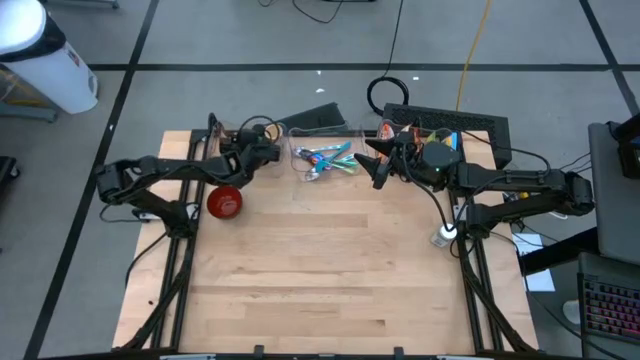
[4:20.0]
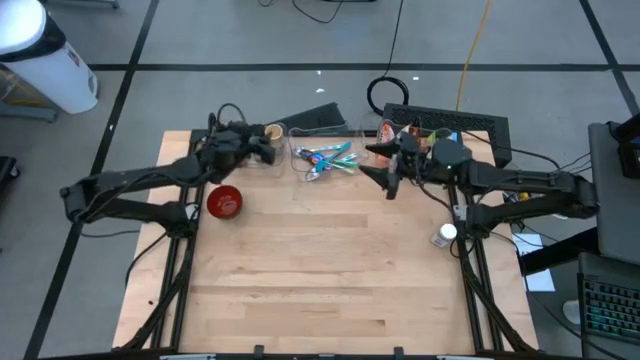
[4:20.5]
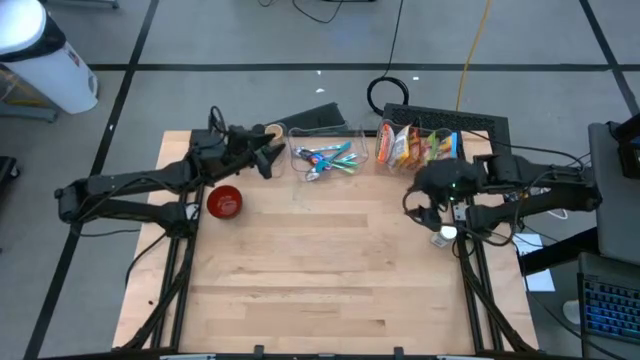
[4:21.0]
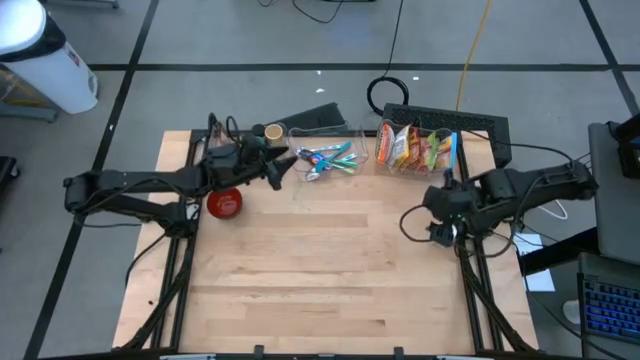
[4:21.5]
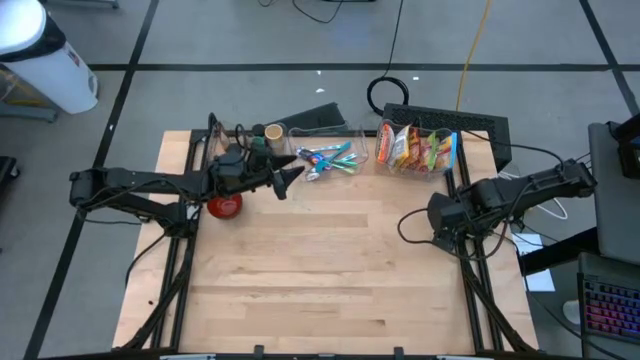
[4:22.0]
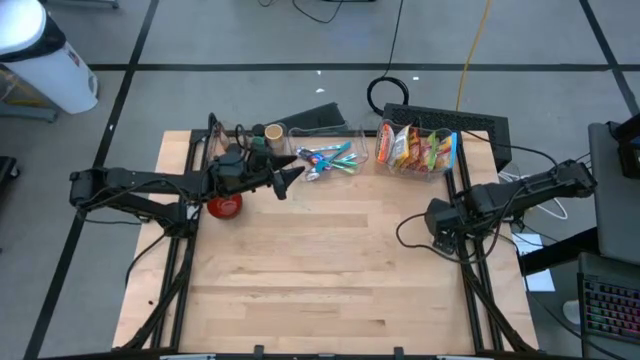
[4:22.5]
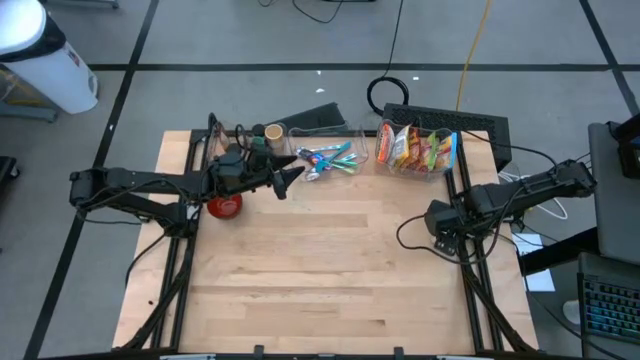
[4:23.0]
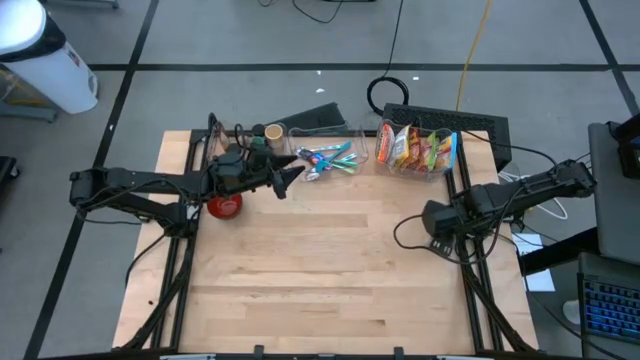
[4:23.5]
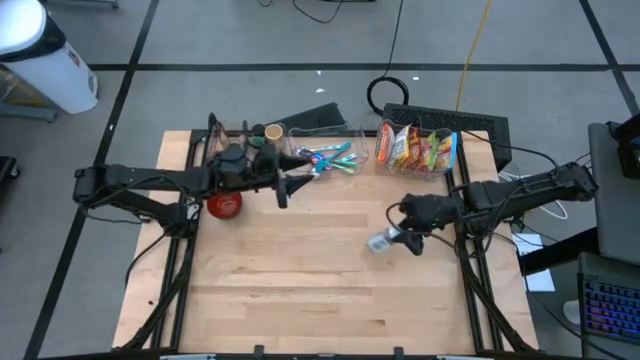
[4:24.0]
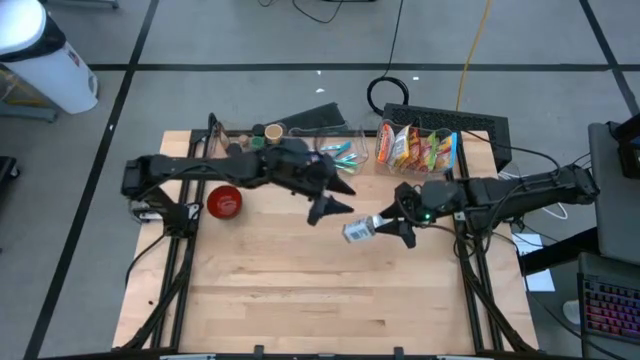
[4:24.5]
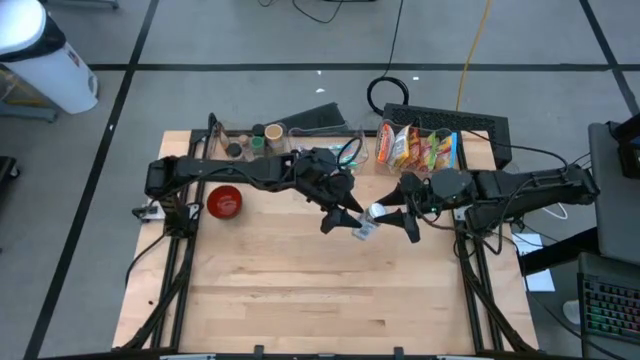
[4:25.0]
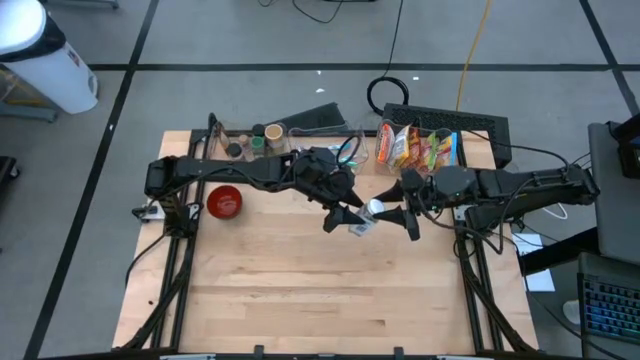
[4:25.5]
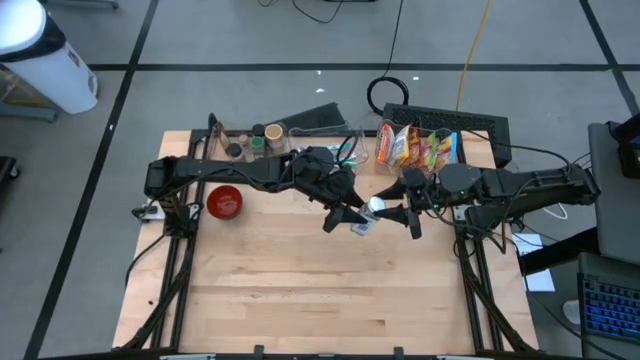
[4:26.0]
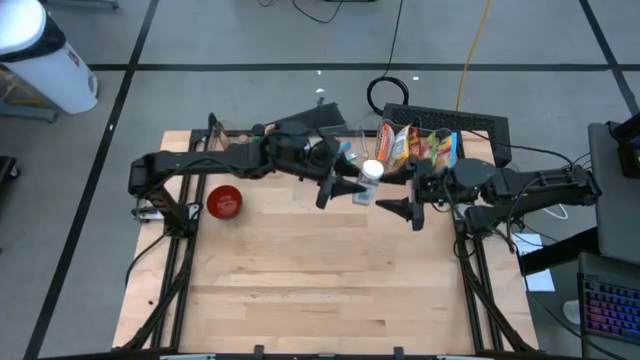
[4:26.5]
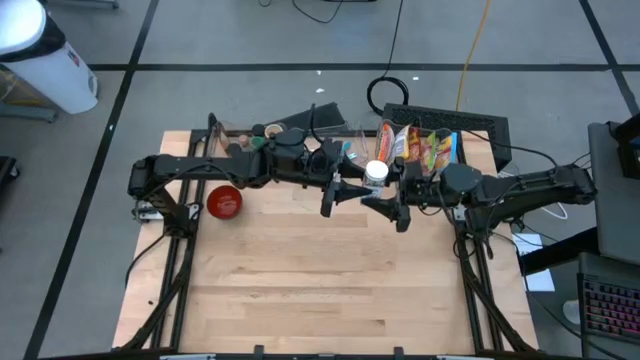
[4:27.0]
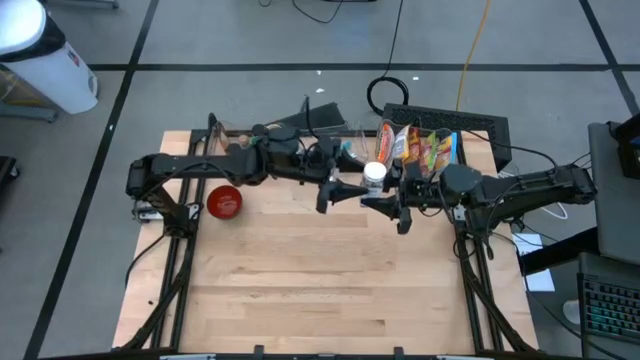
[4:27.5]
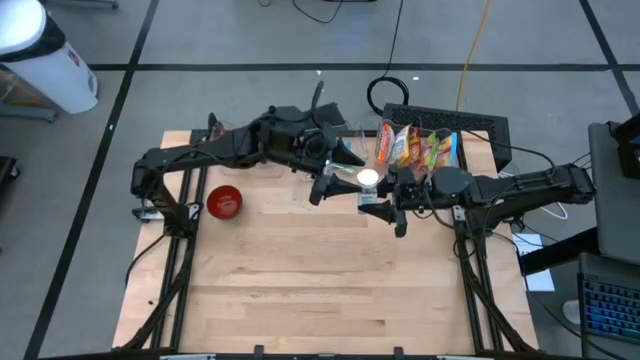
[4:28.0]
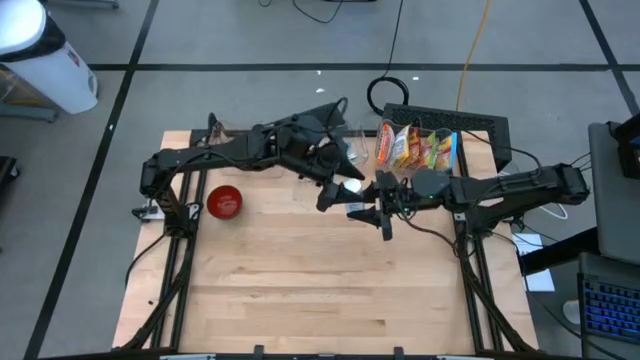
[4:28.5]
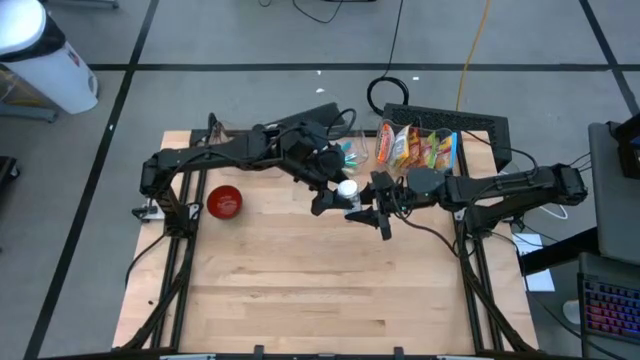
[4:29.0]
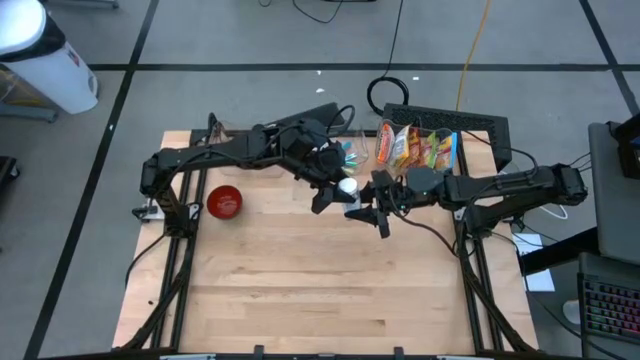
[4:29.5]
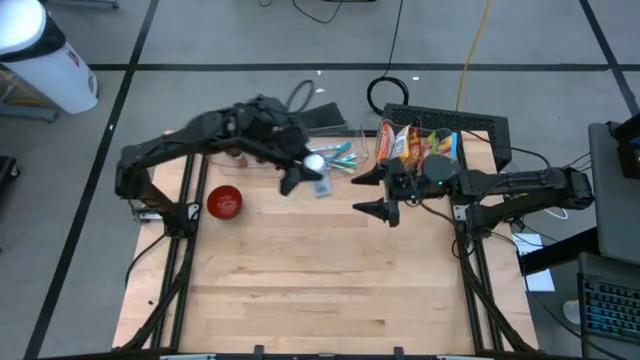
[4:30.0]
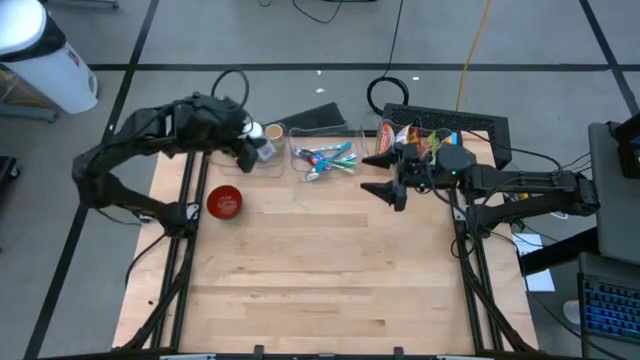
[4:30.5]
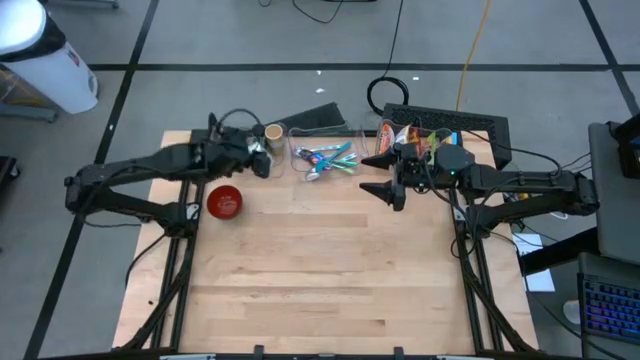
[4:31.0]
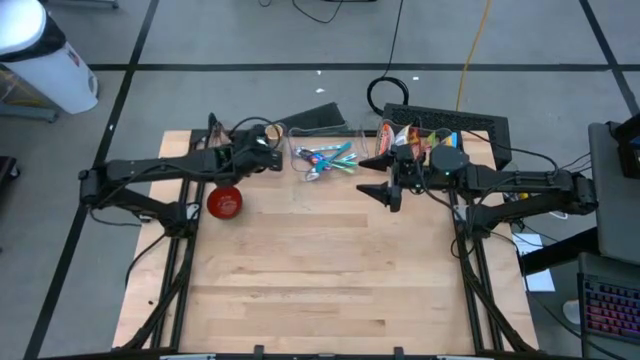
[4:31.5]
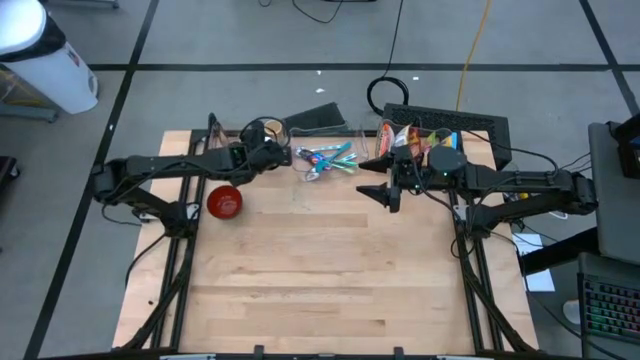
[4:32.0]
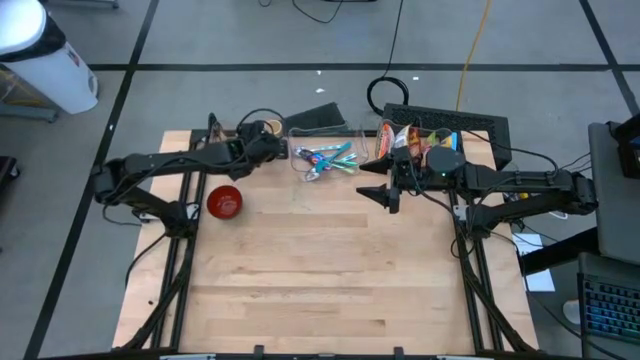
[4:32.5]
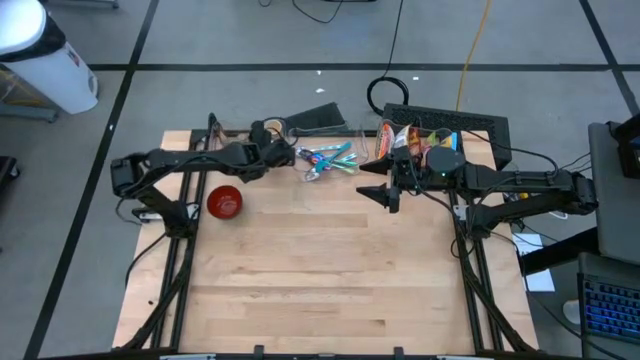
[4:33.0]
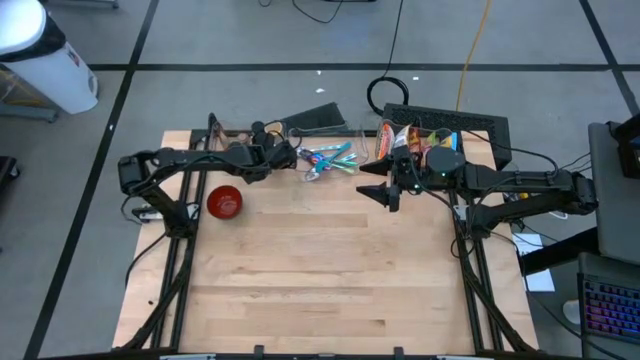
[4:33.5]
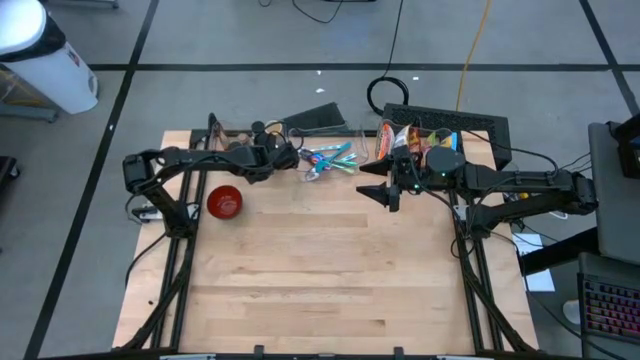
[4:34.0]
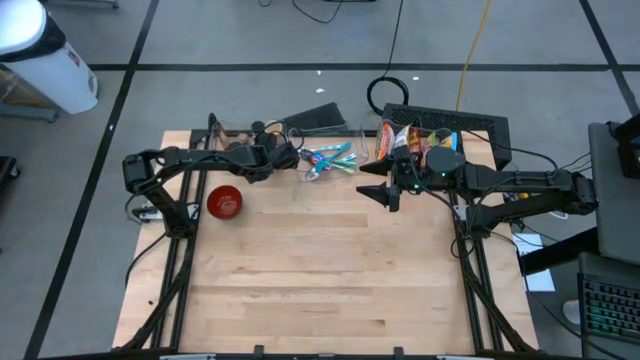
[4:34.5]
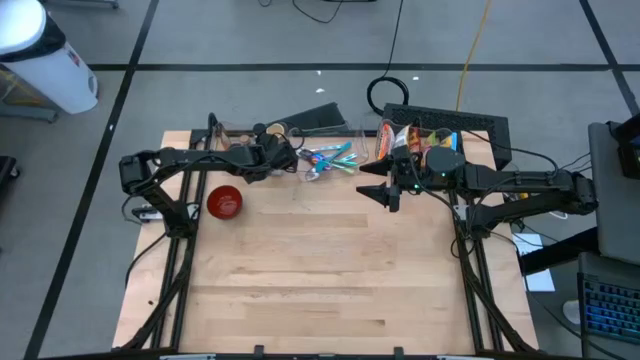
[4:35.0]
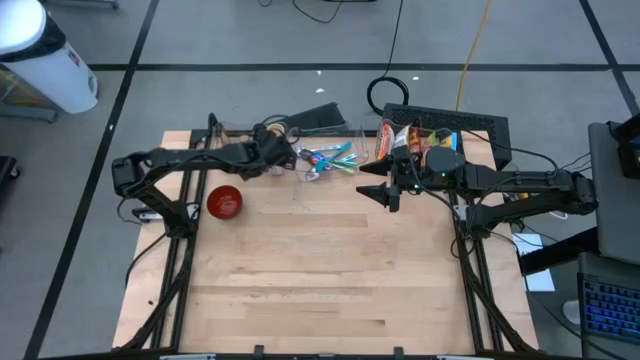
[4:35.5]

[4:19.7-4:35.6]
Task: Pick & Place Food Item
Put the white seasoning bottle into the left transparent bin

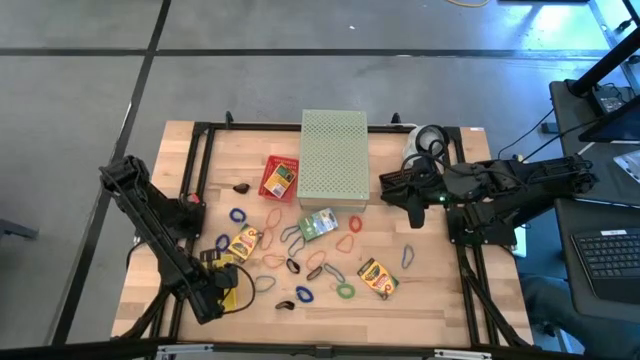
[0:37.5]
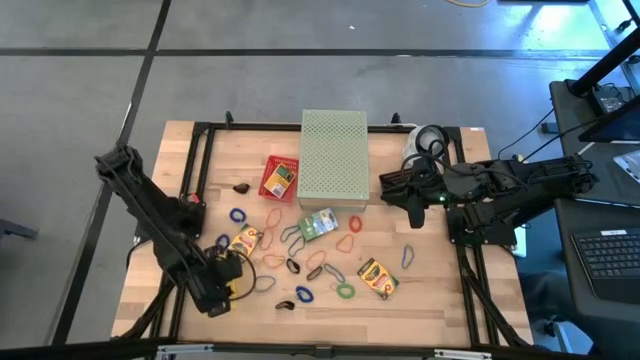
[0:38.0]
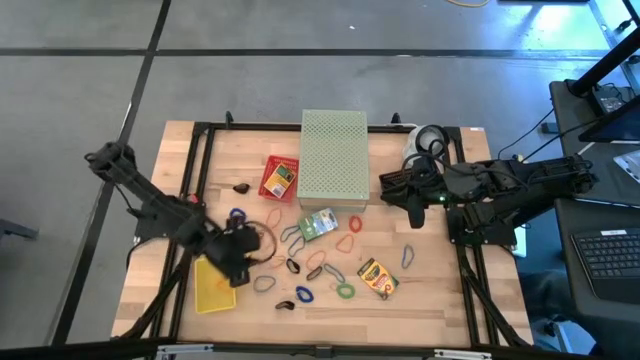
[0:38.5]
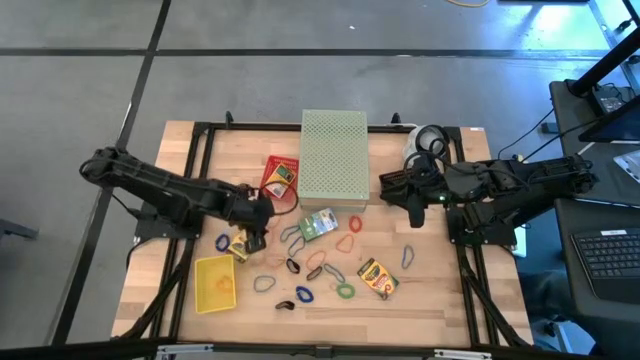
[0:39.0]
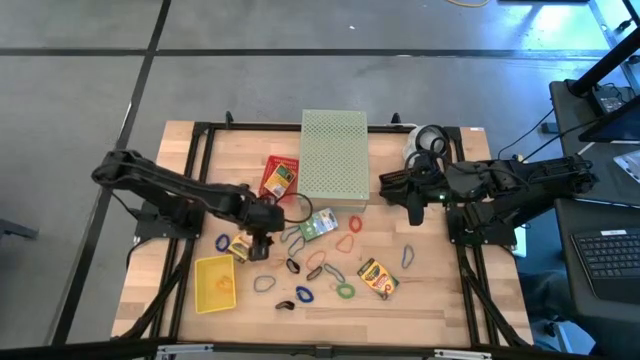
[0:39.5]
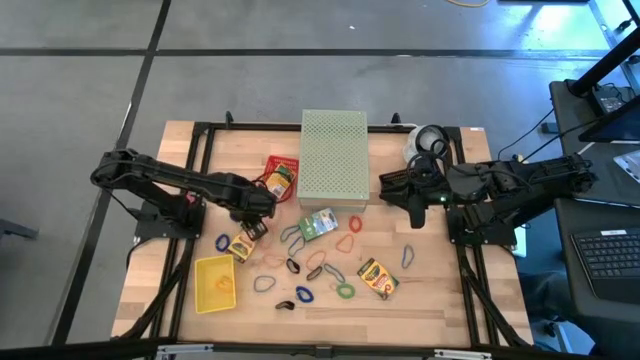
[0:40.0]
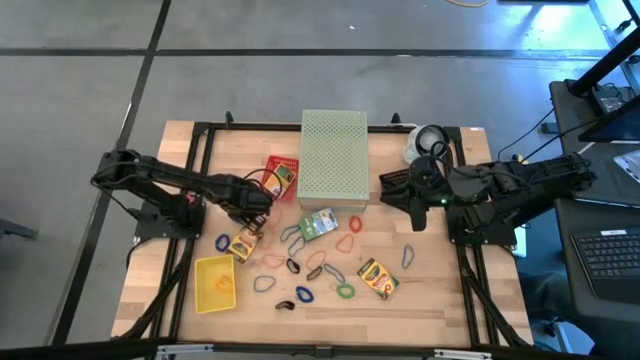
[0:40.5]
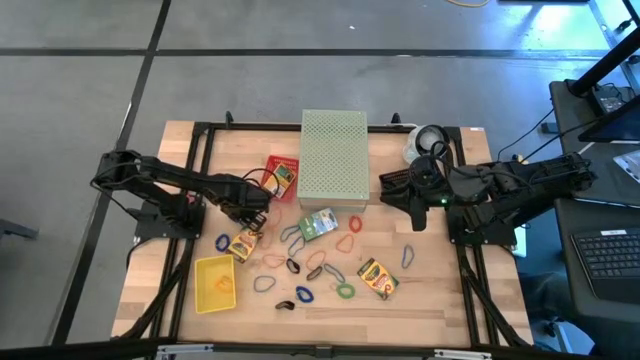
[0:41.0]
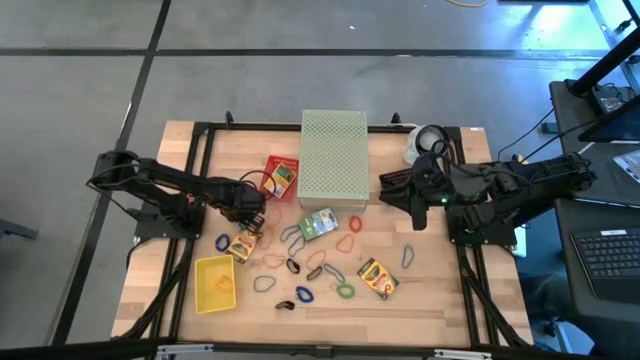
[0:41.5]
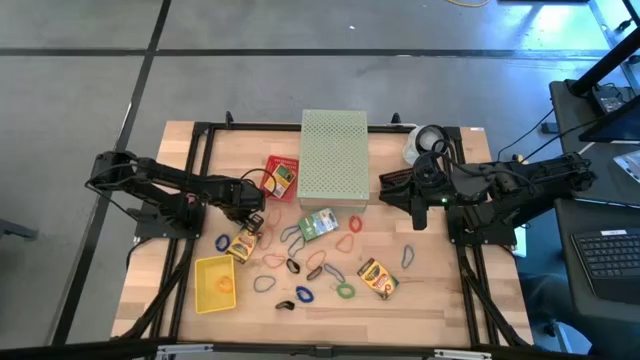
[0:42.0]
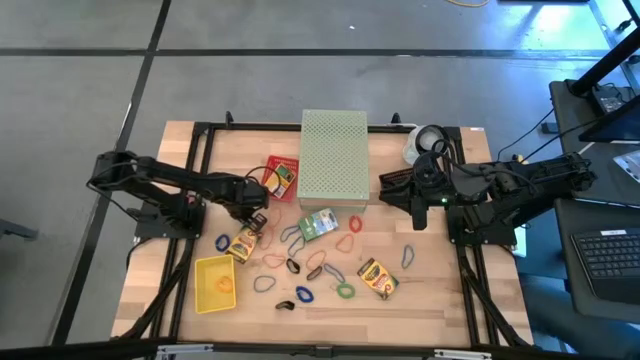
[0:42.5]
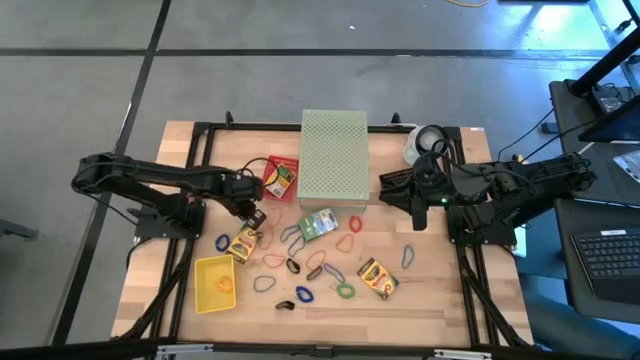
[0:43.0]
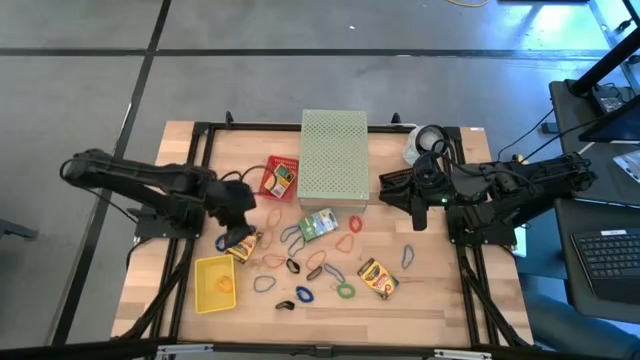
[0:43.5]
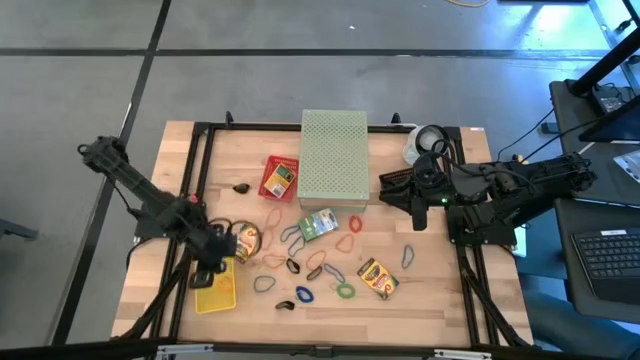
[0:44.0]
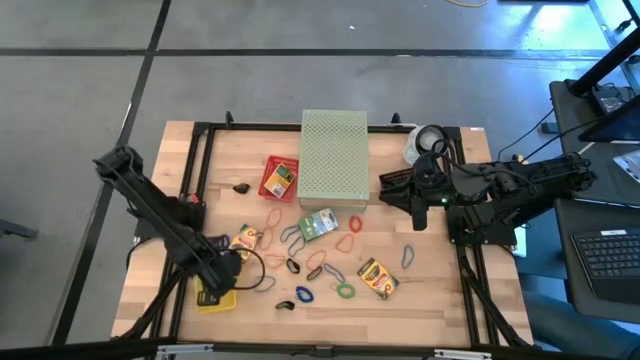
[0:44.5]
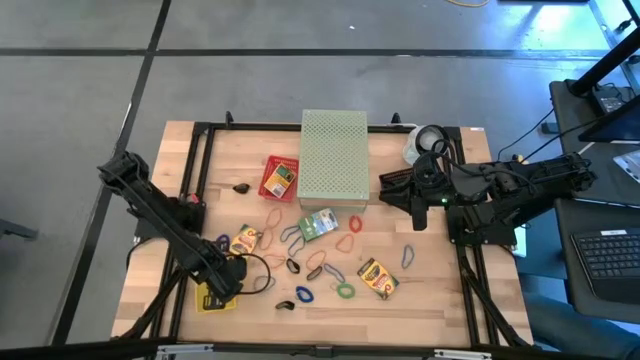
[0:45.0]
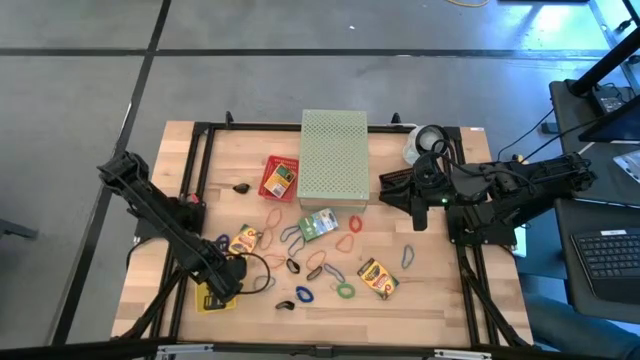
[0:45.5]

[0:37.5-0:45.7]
Task: Pick & Place Office Desk Supplies
Put the blue spring rubber band into the yellow bin
